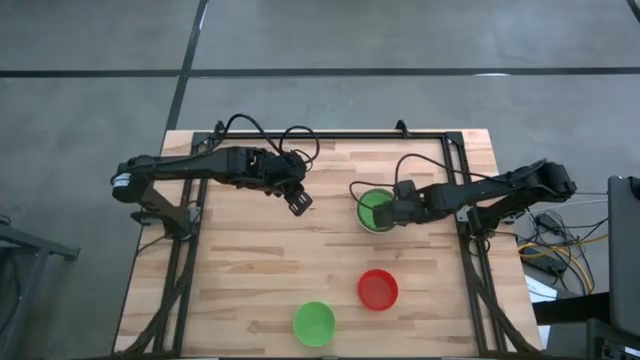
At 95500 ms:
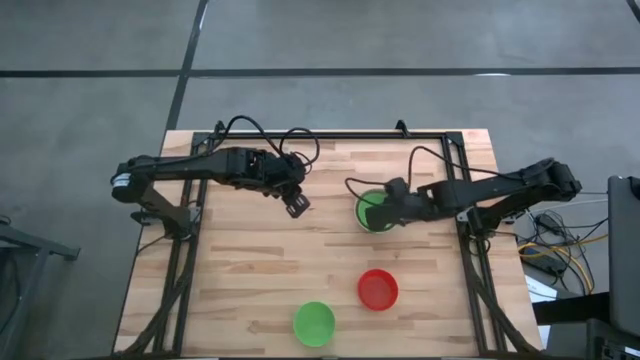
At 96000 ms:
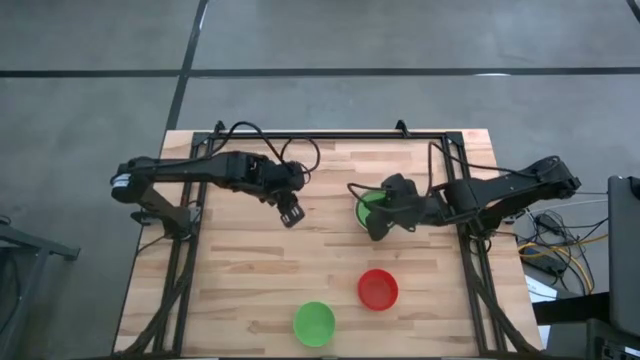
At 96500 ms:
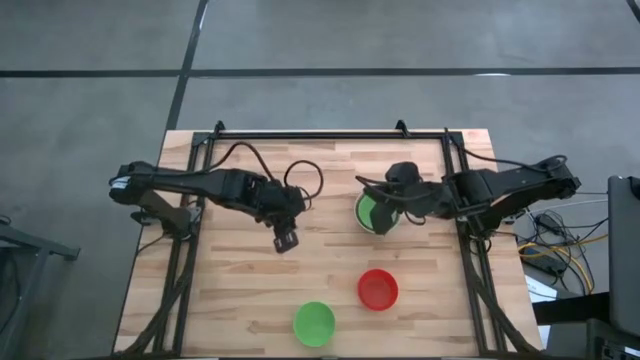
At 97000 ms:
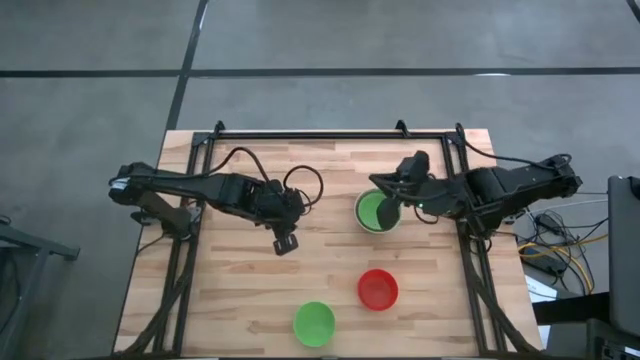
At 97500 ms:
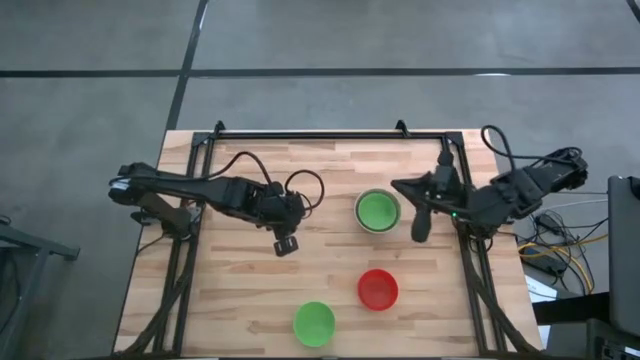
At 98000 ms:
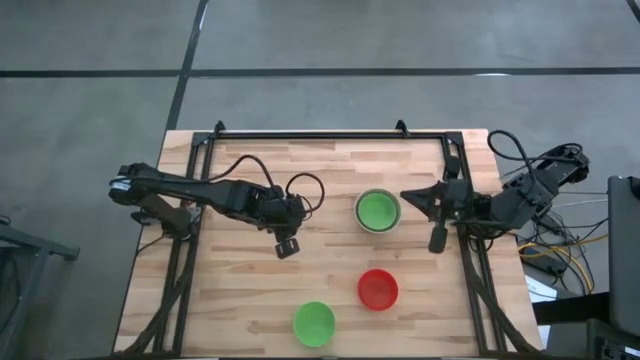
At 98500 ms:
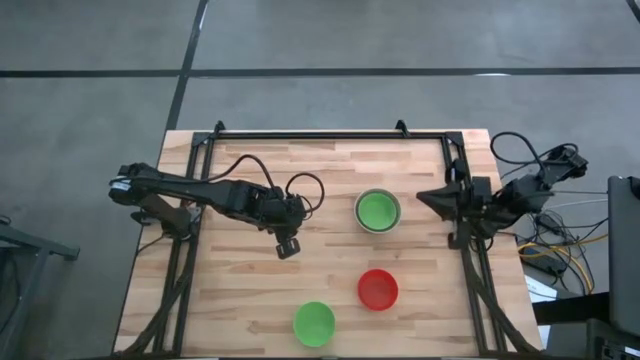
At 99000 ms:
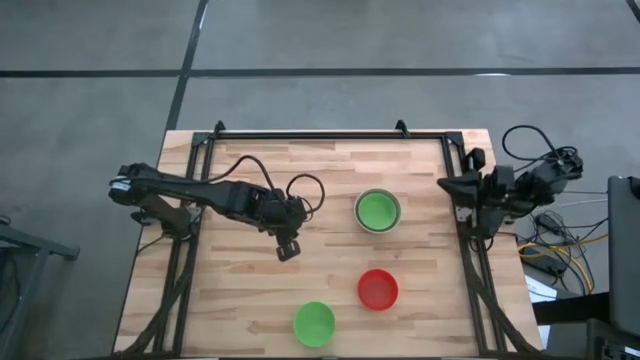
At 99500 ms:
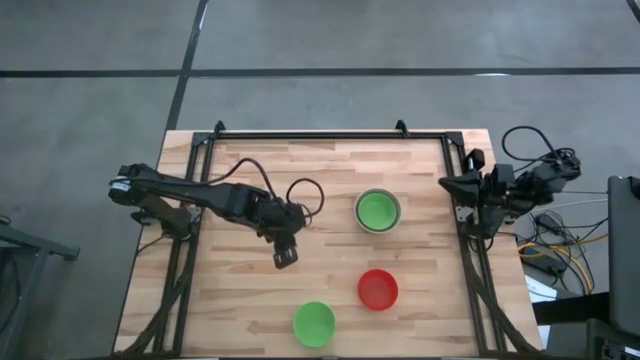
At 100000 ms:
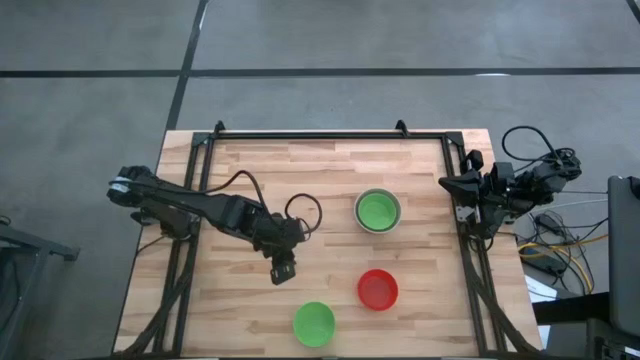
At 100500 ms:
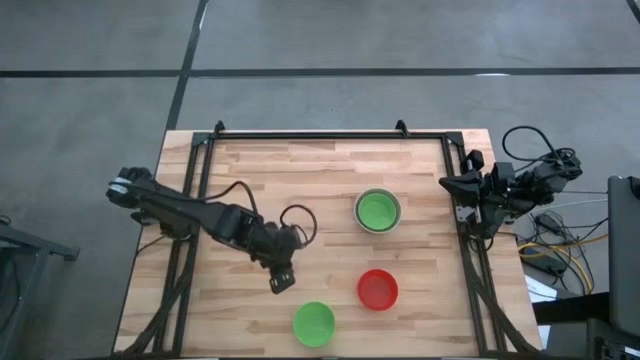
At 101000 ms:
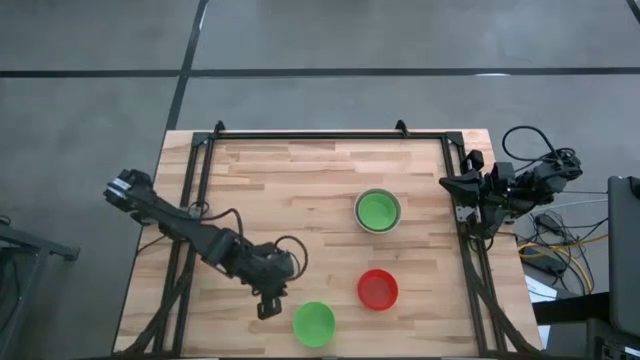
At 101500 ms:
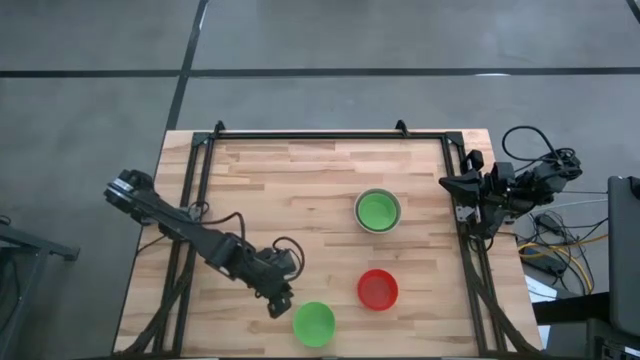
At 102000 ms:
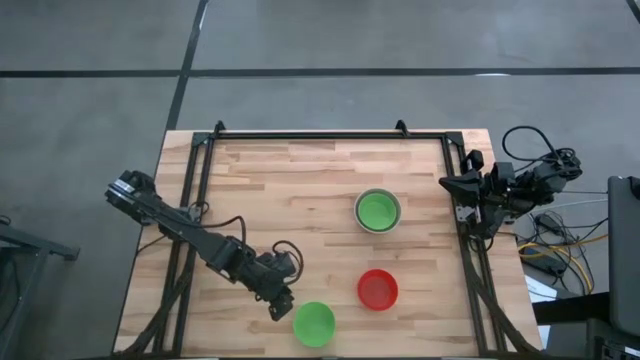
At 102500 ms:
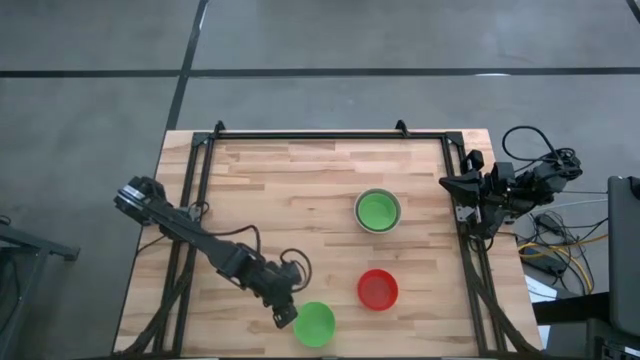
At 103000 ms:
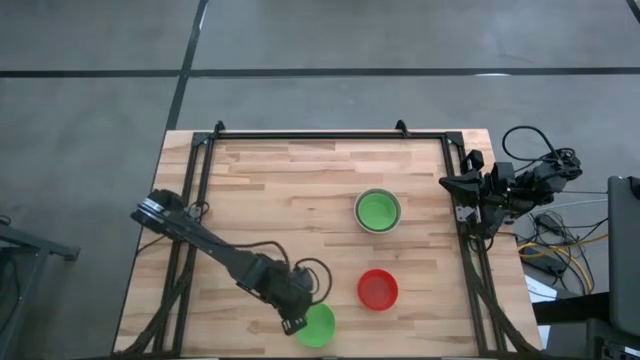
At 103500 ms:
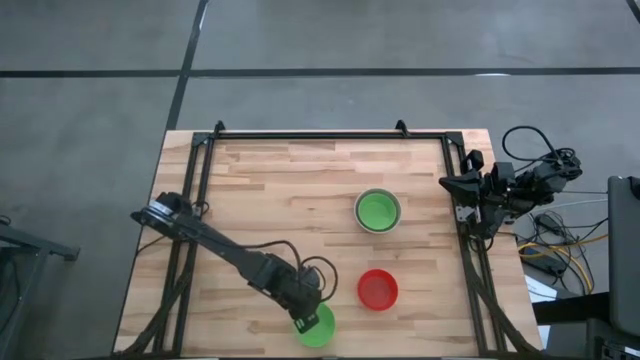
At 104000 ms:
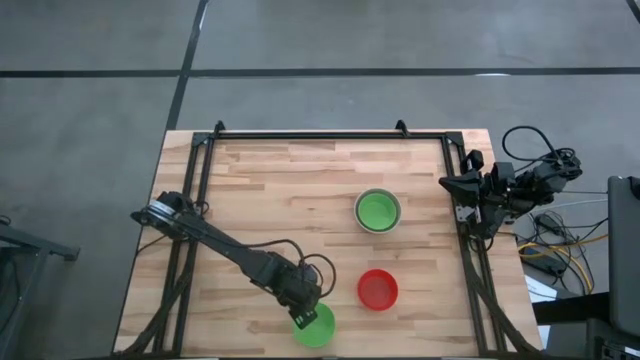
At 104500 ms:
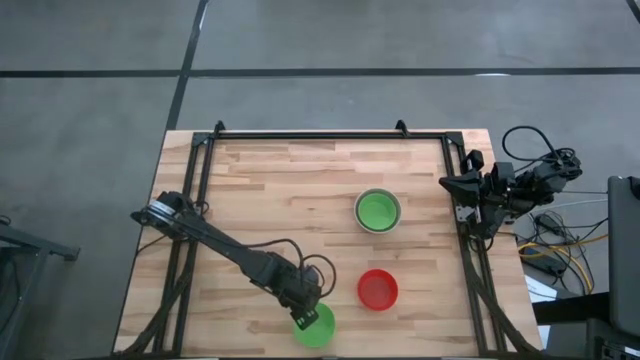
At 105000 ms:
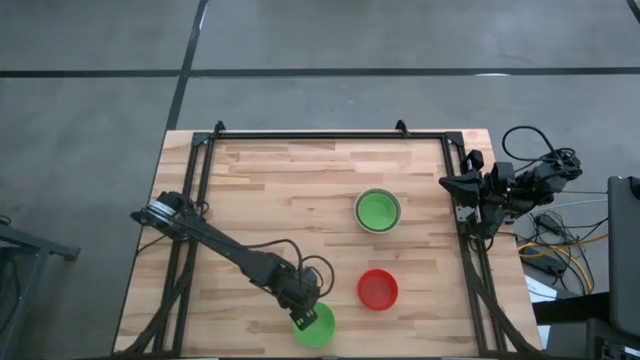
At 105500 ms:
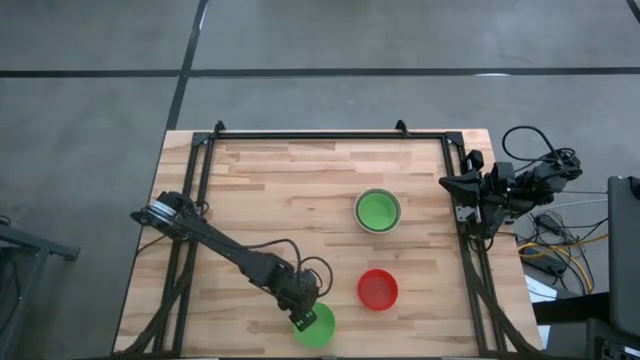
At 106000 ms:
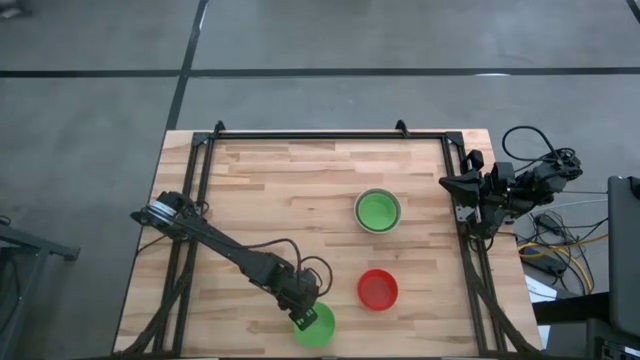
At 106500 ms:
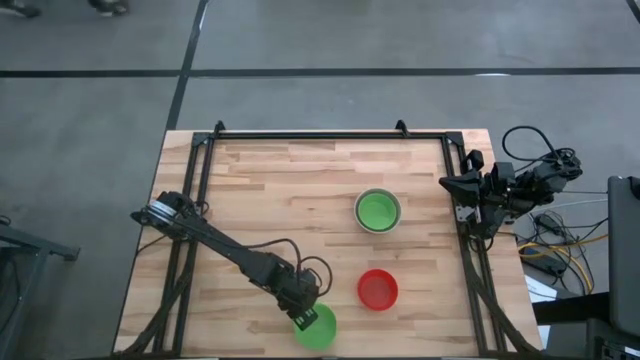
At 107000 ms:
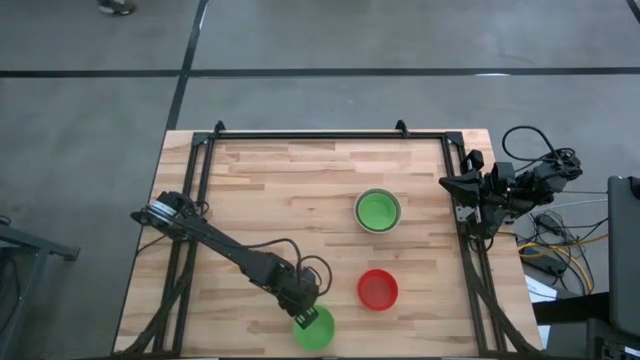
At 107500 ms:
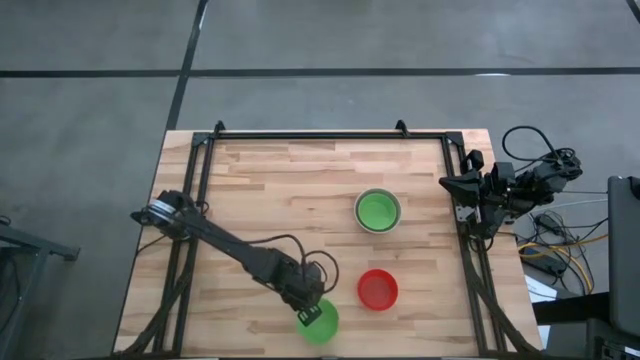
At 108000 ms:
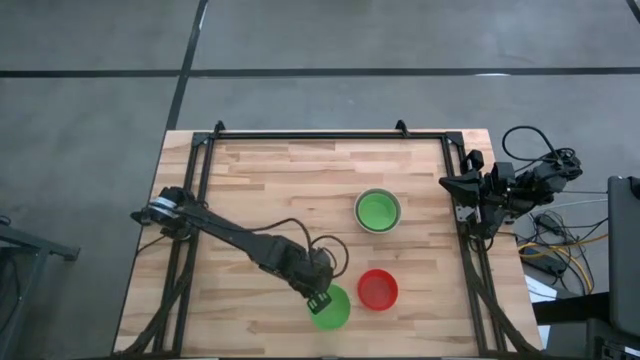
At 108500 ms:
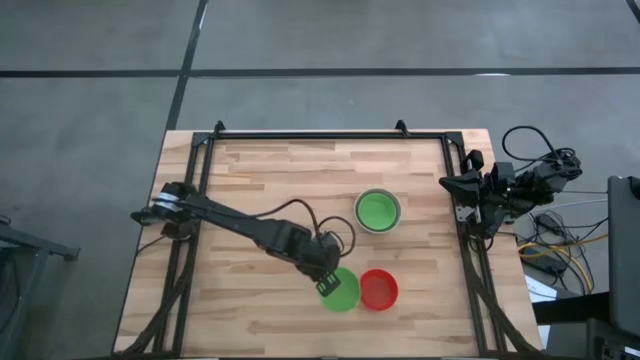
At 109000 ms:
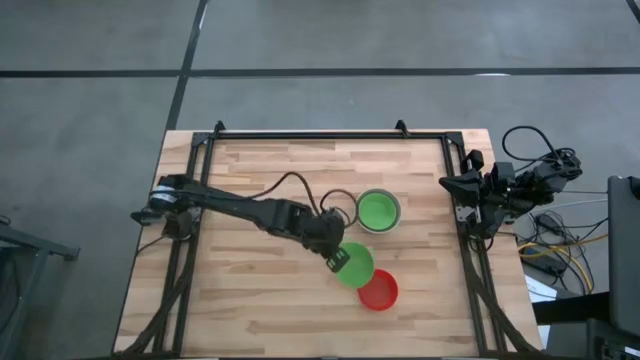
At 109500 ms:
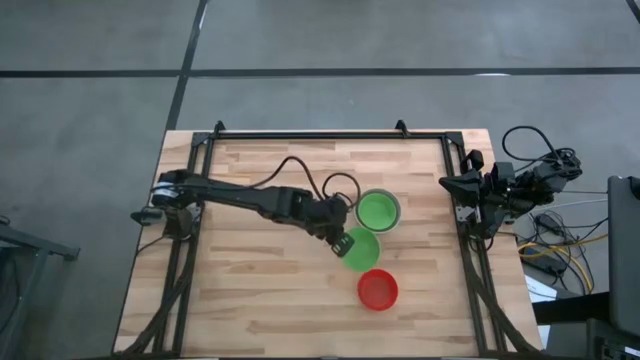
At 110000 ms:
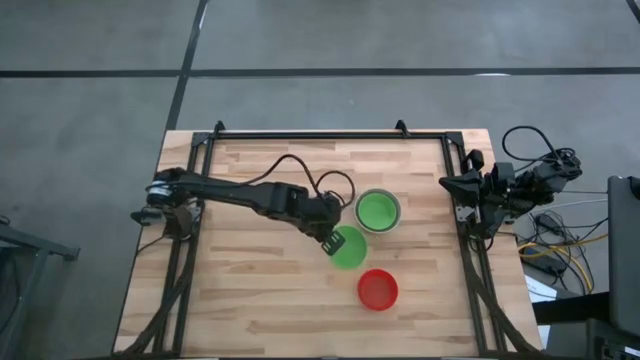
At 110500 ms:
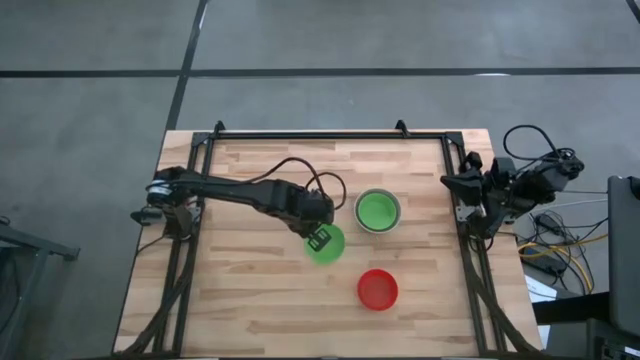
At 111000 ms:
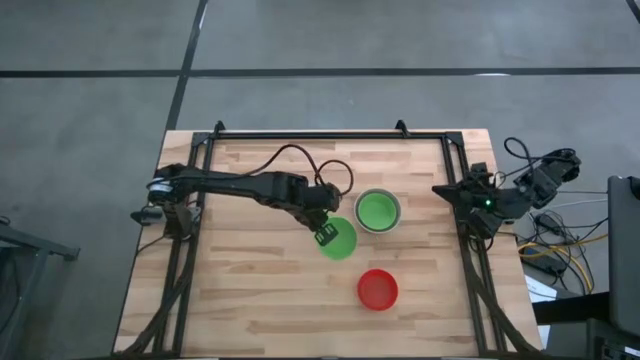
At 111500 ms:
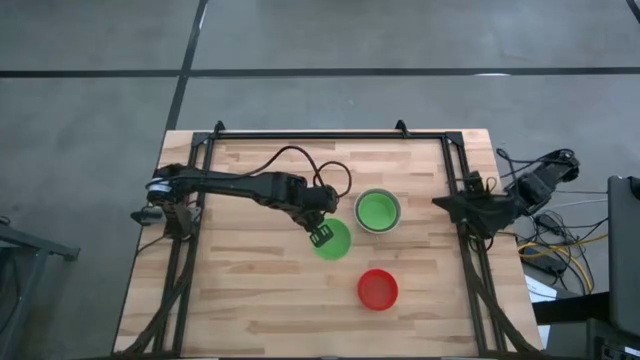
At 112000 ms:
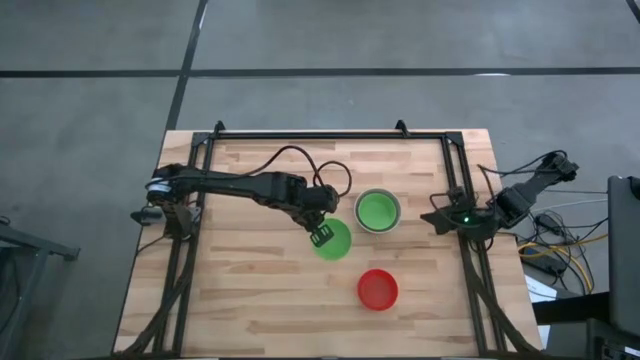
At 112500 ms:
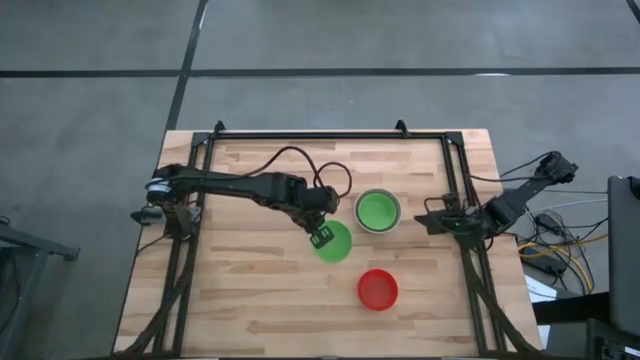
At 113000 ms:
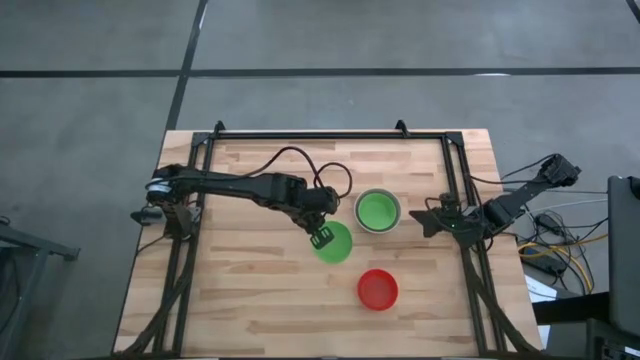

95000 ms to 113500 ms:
Stack the green bowl on the green bowl
